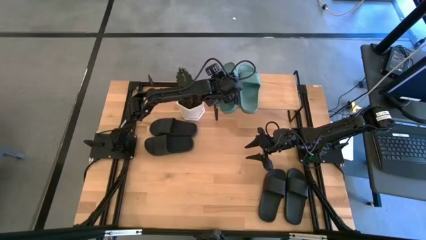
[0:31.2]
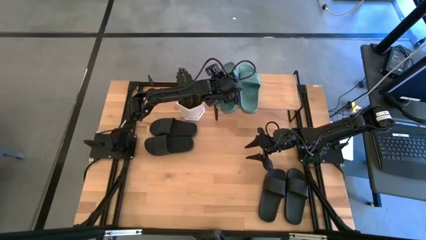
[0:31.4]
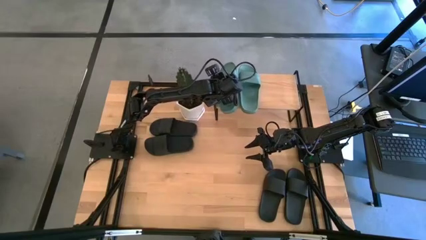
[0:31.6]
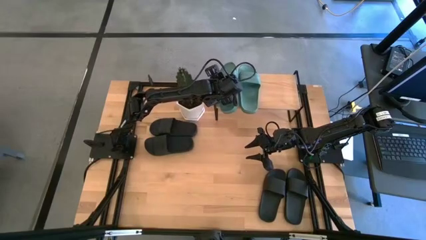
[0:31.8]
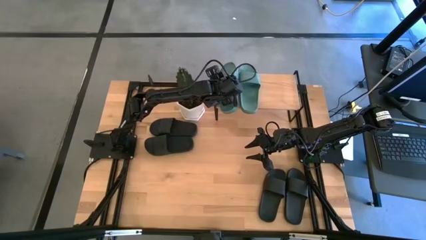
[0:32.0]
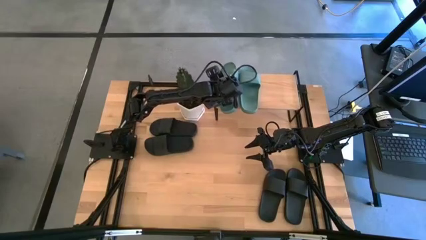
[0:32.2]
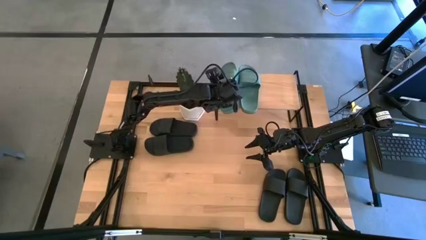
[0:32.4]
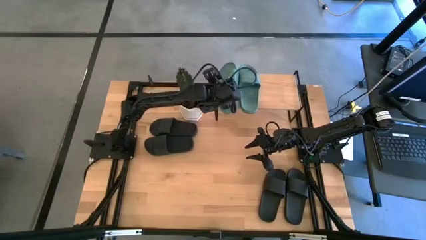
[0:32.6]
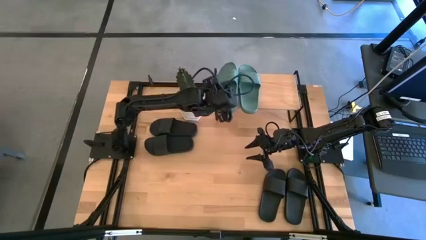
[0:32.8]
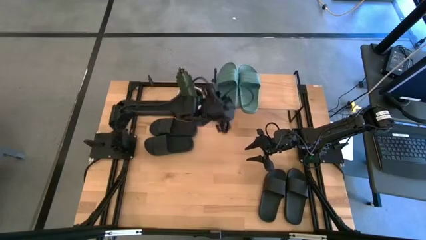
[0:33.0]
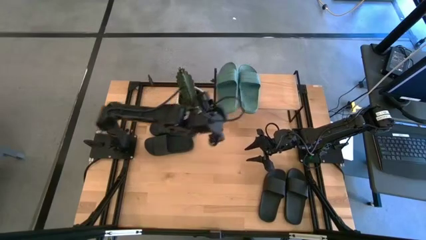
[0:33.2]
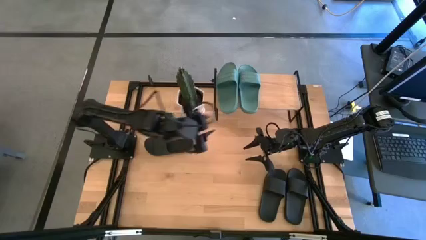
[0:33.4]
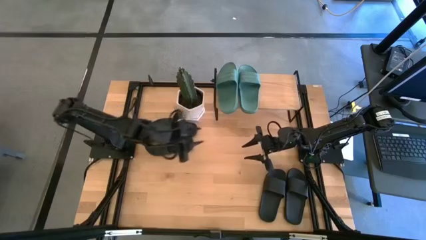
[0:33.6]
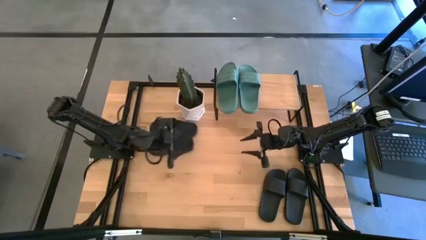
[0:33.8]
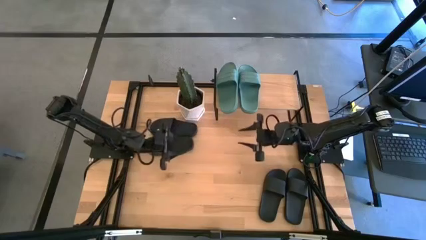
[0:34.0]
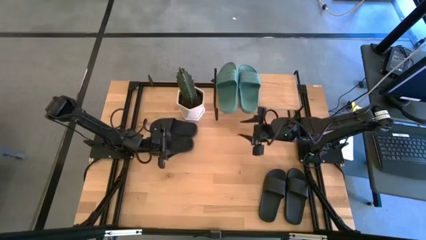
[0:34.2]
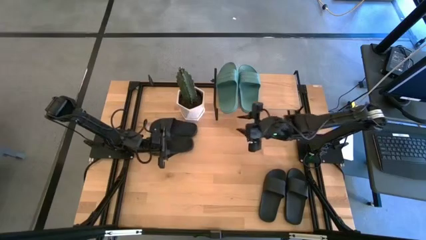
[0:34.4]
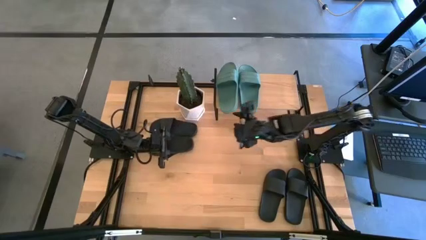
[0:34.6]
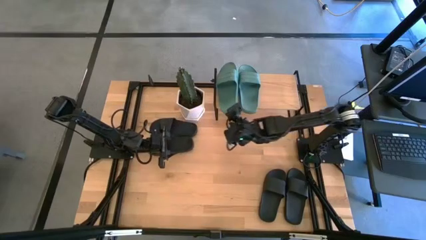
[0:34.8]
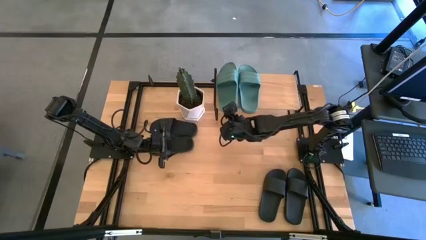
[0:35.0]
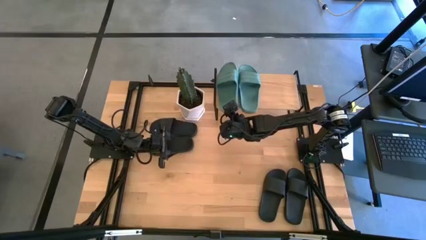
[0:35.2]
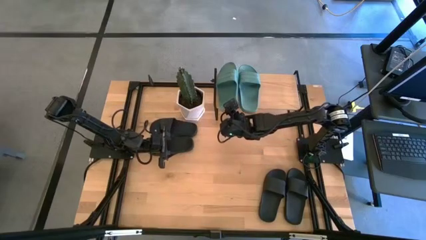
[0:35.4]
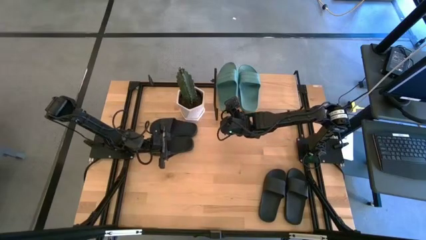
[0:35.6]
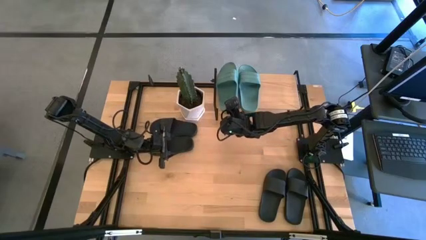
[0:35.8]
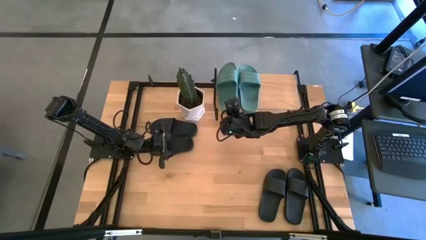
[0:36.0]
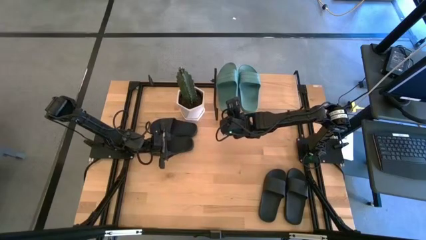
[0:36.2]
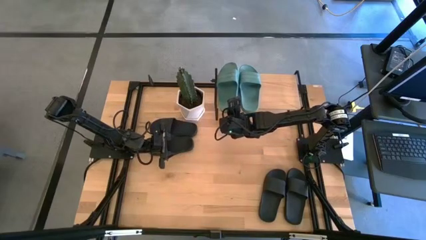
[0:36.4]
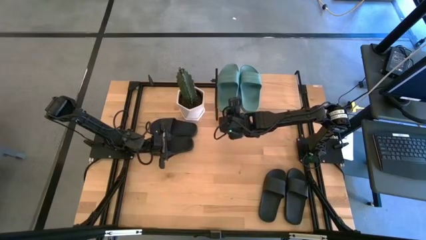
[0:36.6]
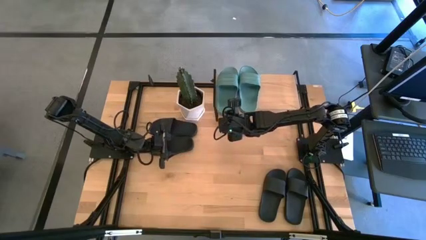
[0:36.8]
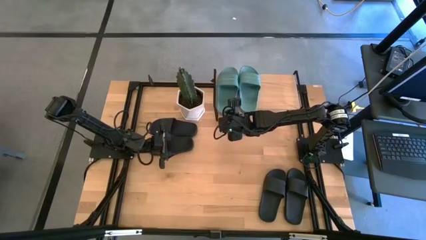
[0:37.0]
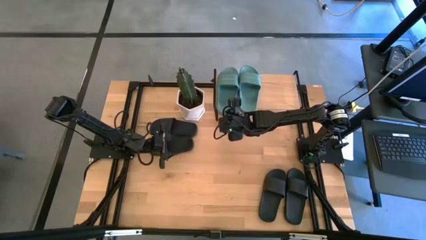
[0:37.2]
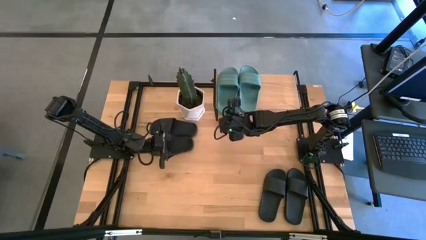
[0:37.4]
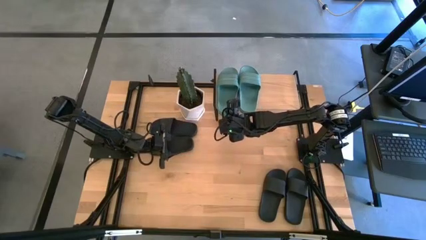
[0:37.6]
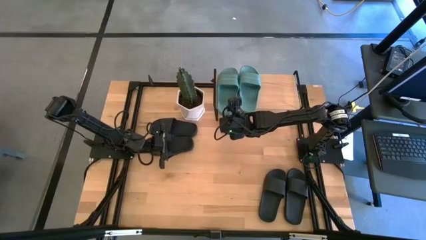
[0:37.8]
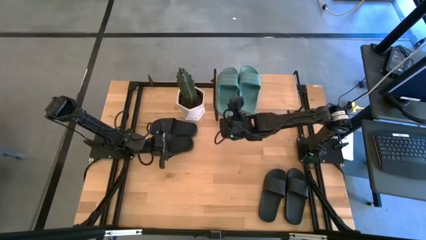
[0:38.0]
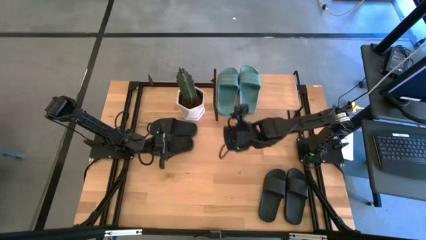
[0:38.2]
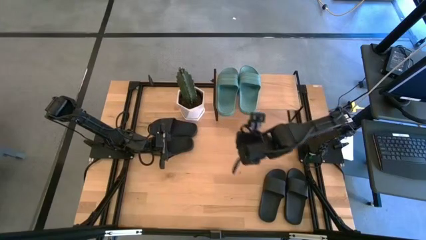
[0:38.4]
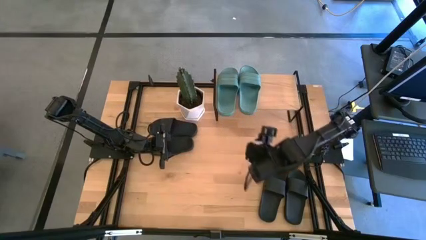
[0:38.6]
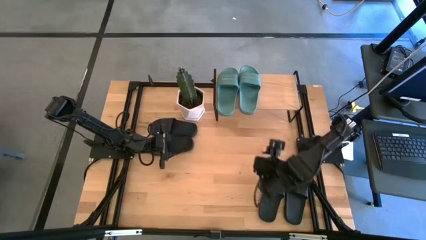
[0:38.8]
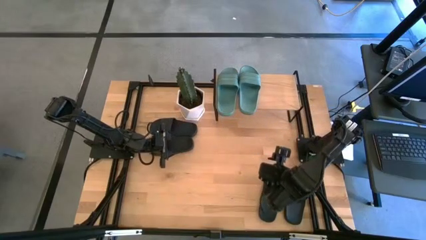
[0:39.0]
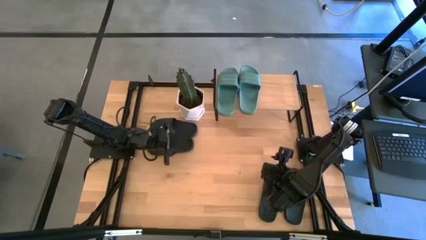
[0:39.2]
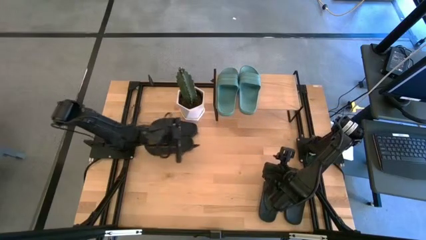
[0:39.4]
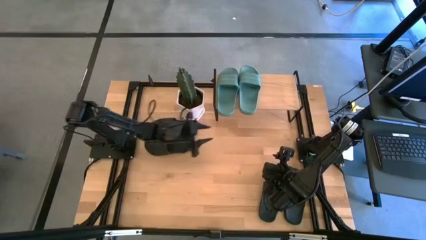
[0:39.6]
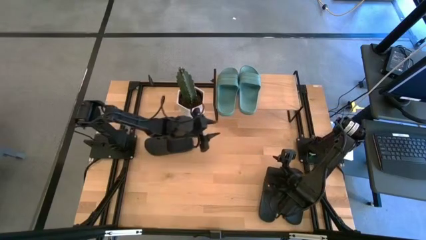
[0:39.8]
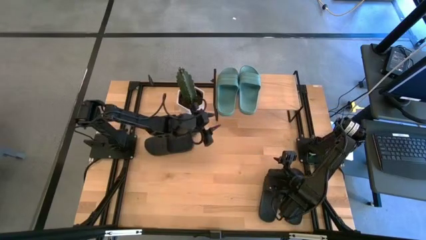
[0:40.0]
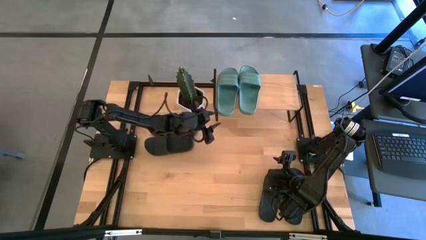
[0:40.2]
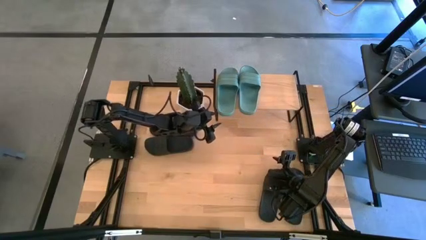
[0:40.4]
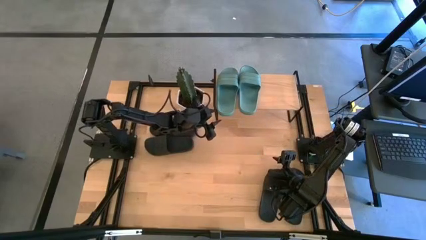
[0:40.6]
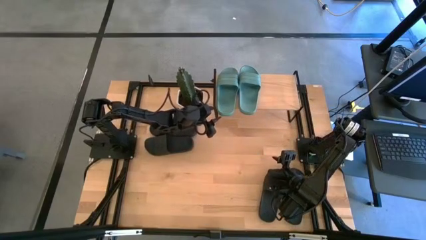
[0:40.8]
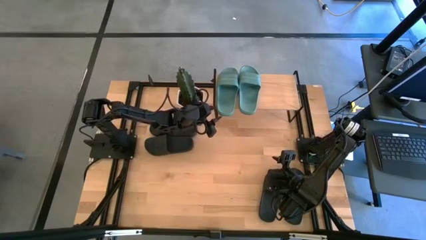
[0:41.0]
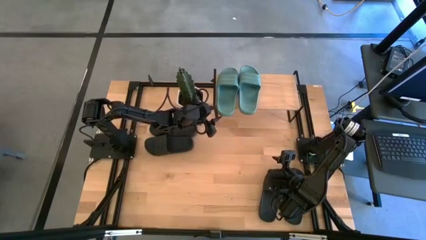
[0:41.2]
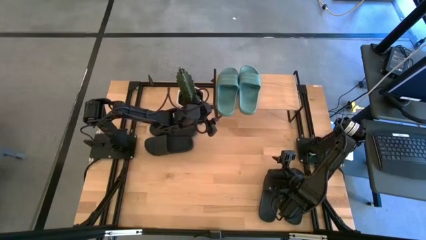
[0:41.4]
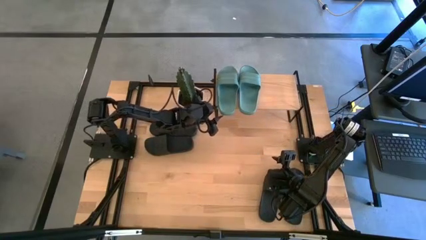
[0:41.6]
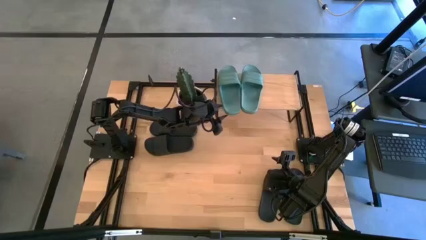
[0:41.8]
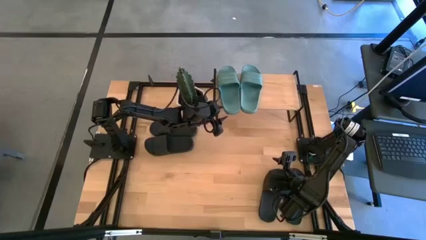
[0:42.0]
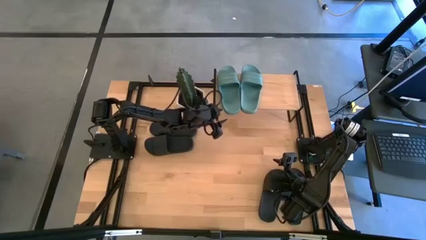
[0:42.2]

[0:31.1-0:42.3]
Task: Pick and place slides into the shelf
Put the green slipper on the shelf
